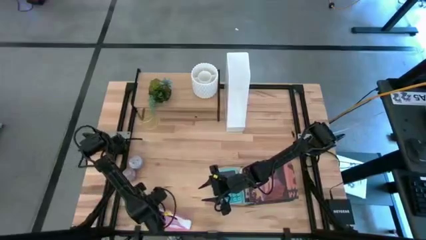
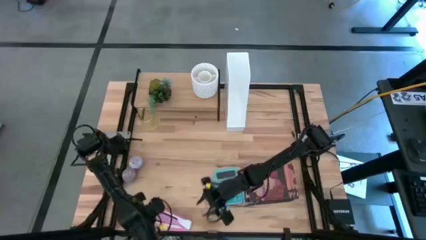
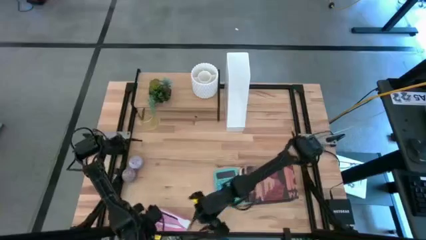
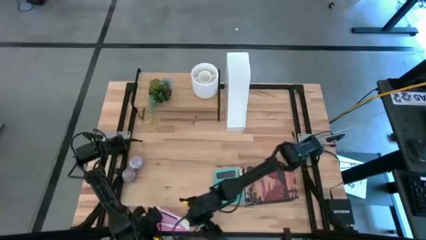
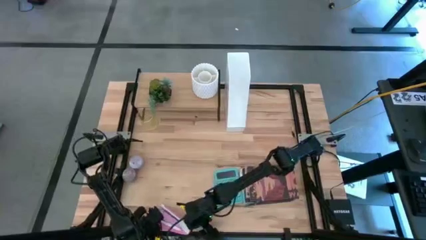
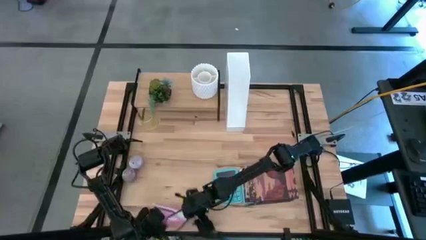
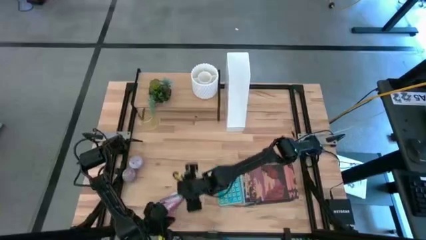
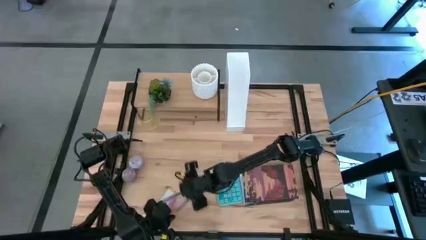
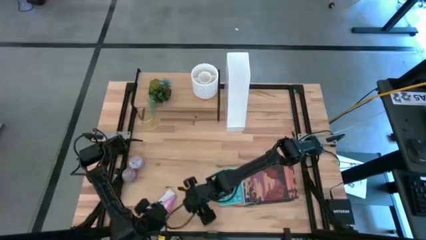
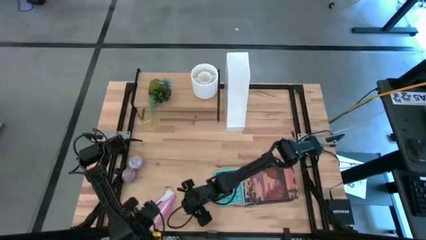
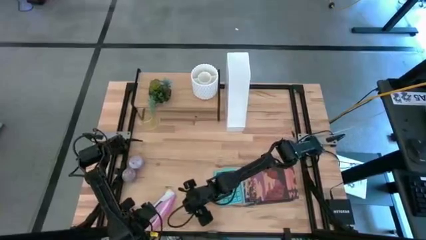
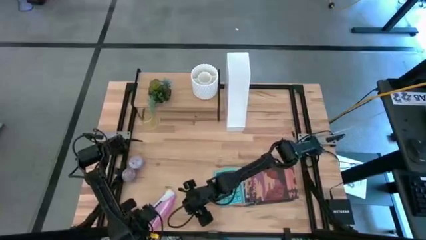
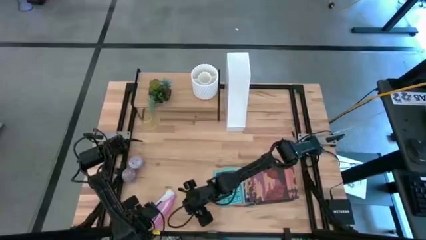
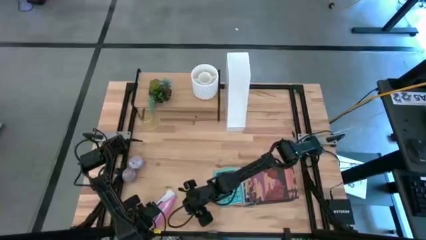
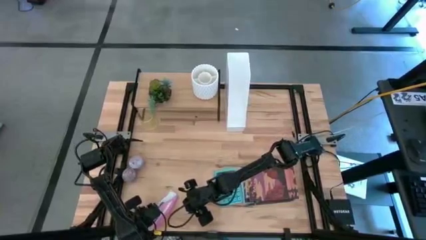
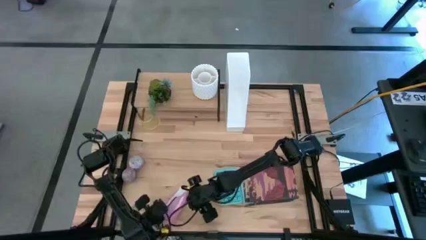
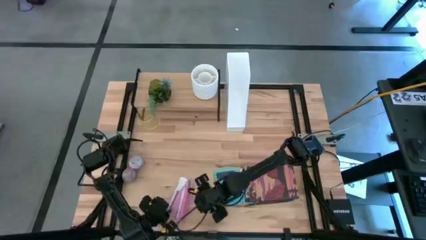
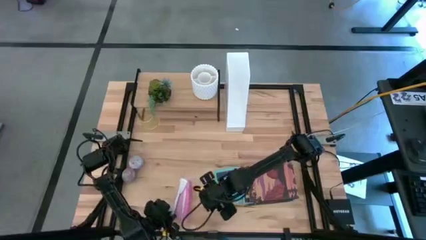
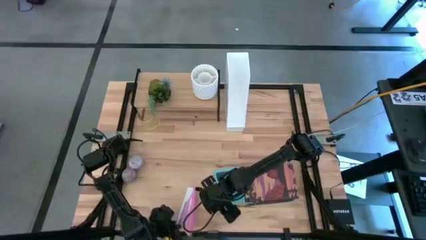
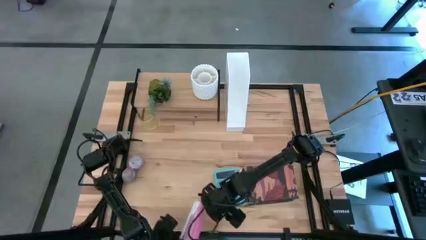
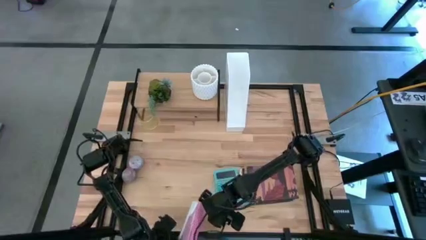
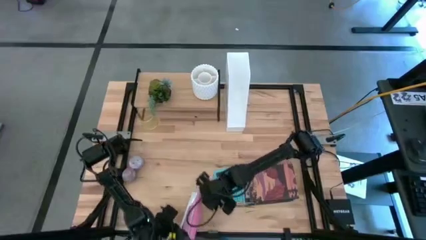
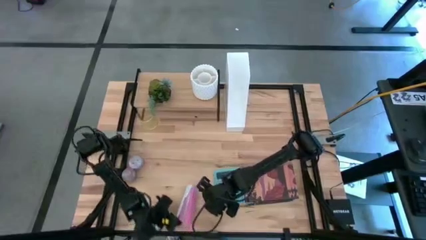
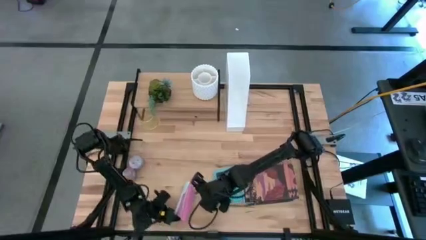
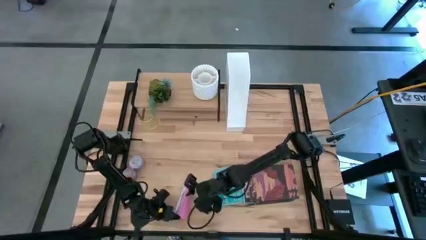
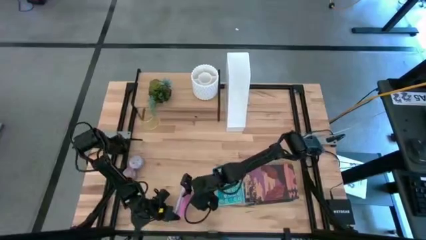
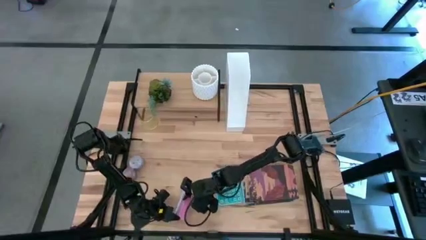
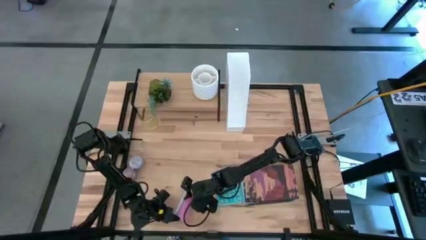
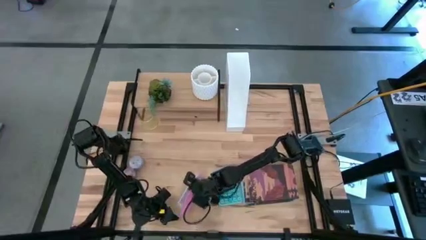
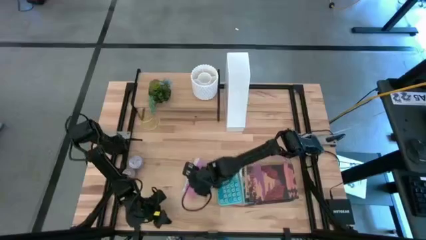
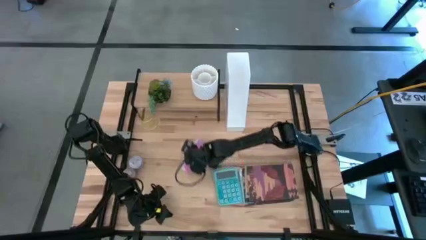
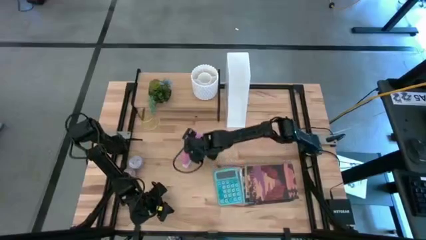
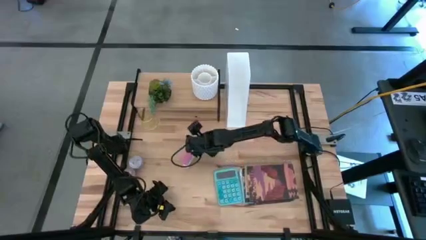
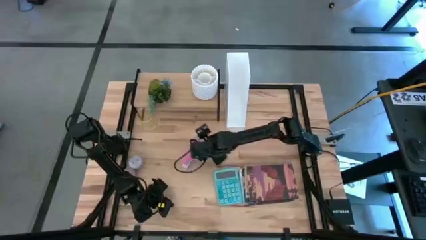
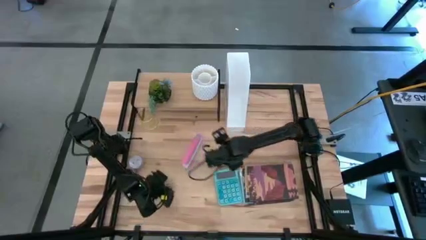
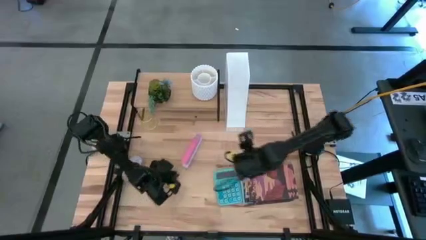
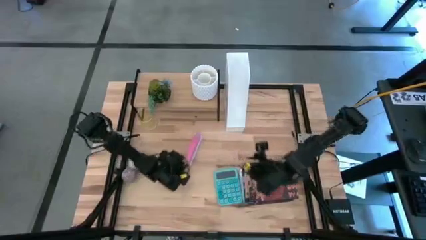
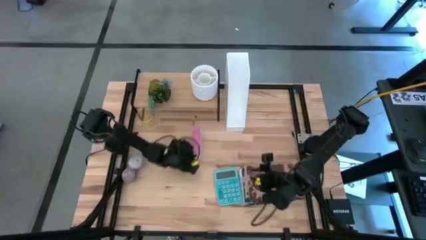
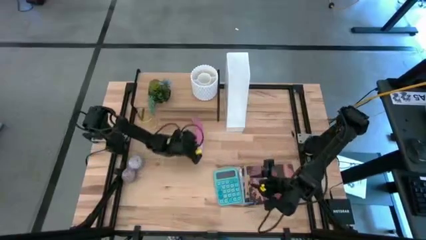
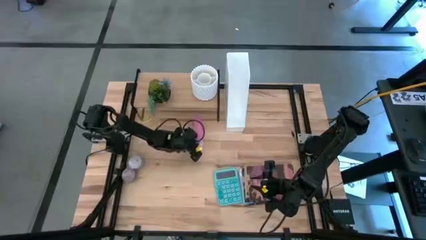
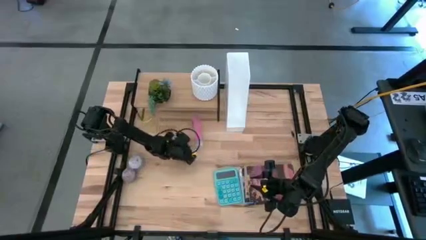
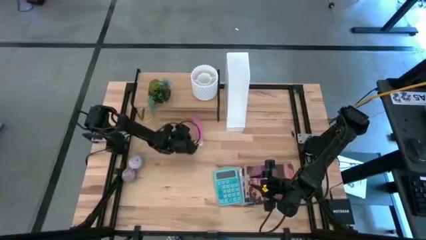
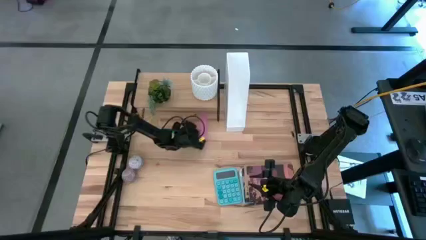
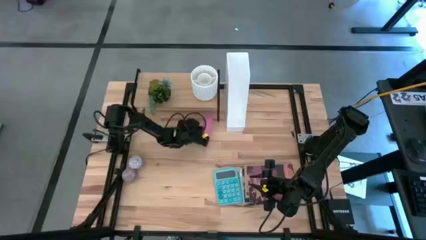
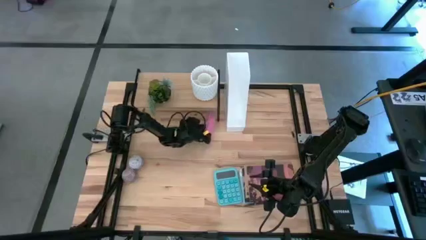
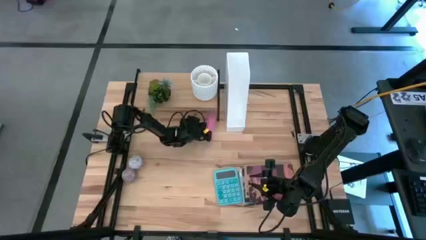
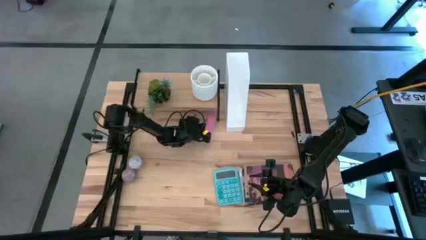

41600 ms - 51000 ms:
Task: Stock shelves
Put the pink stapler under the shelf

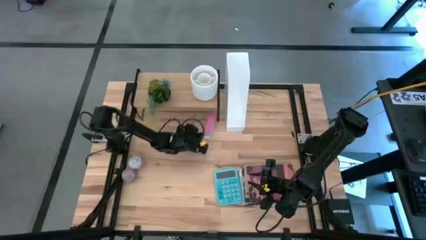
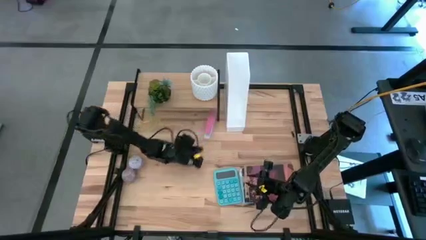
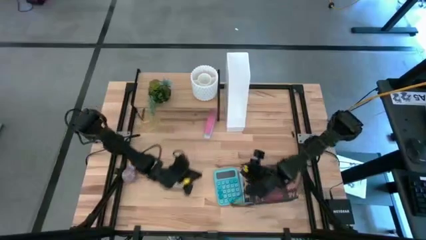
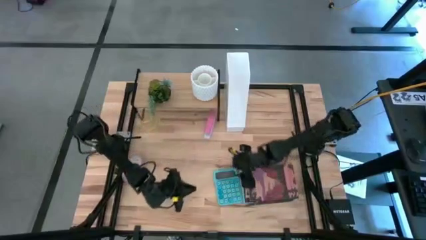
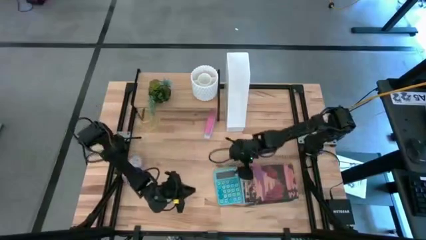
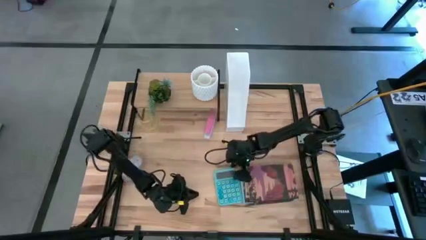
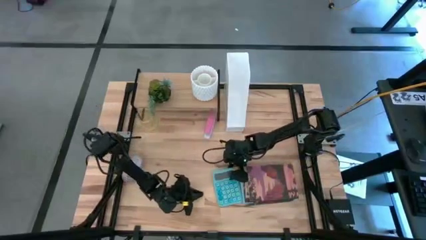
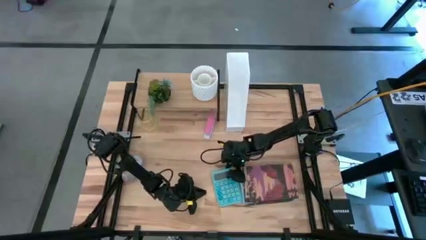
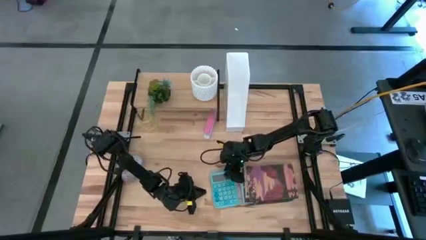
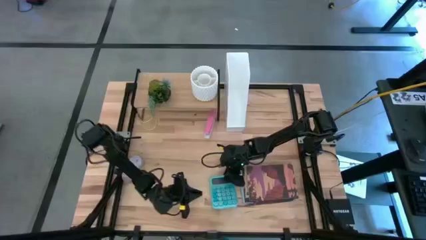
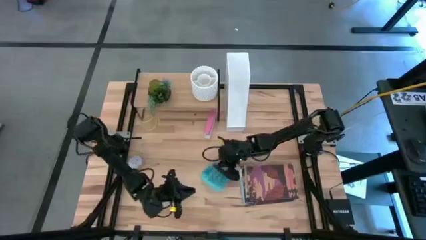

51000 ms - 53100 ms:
Put the blue calculator under the shelf

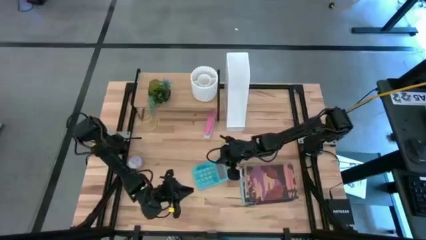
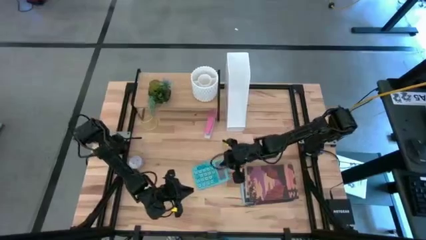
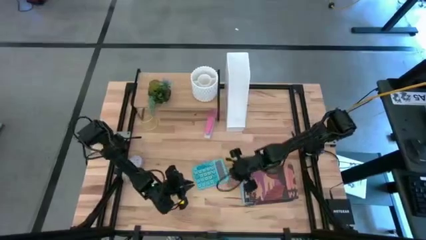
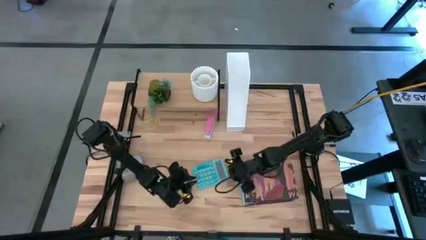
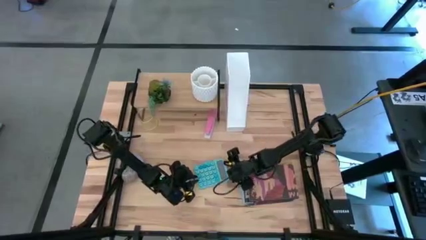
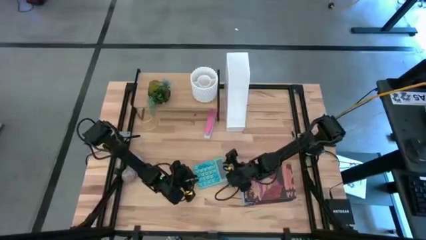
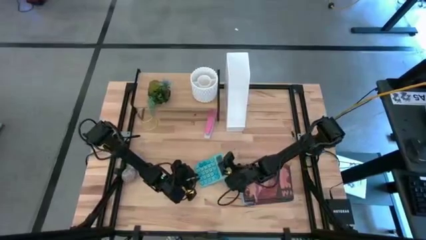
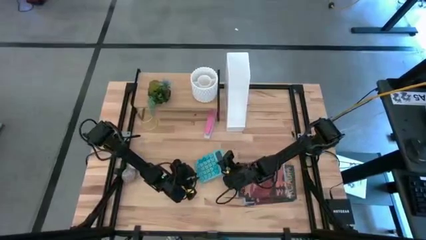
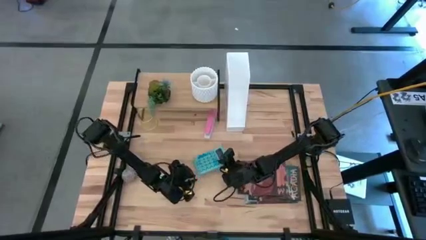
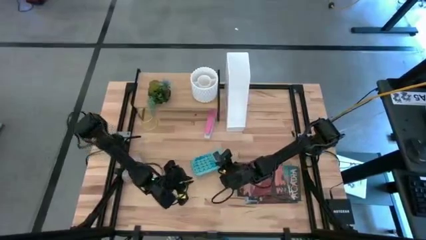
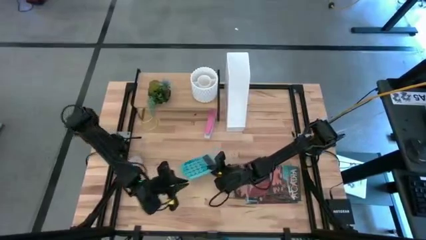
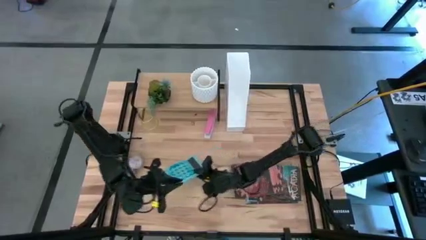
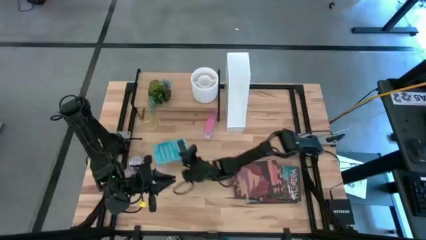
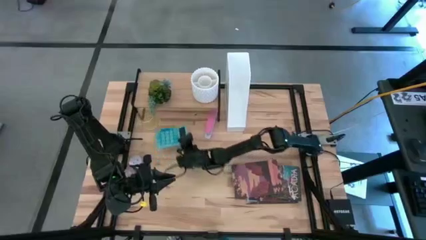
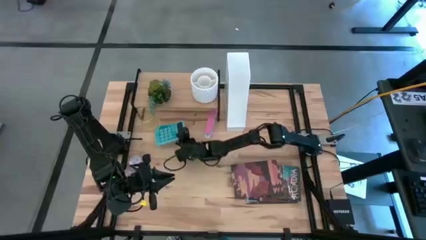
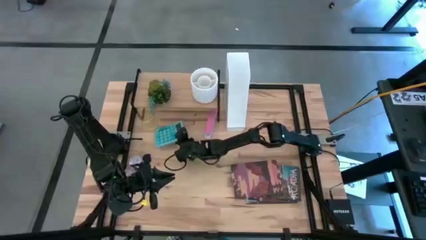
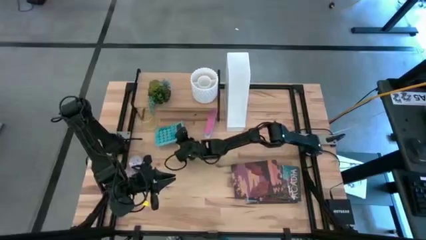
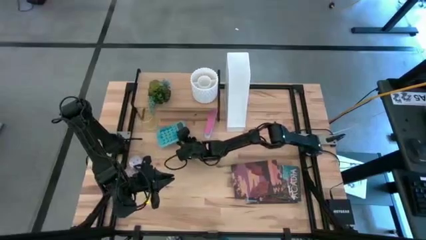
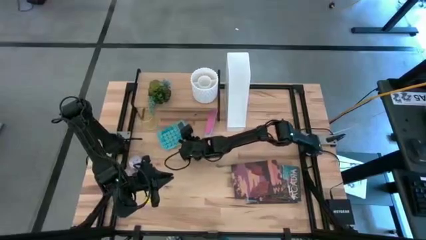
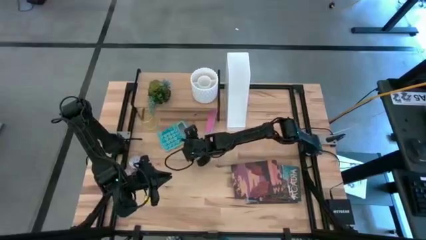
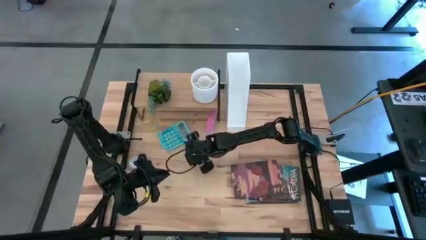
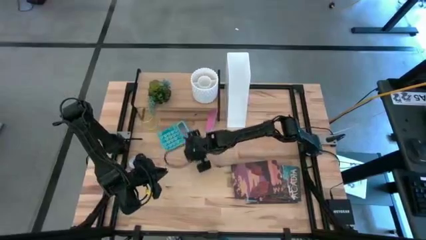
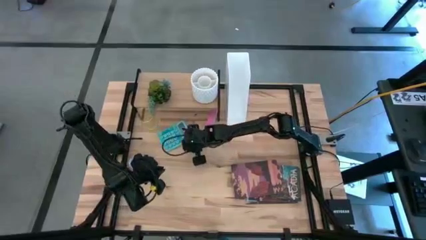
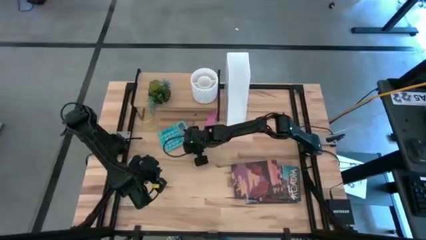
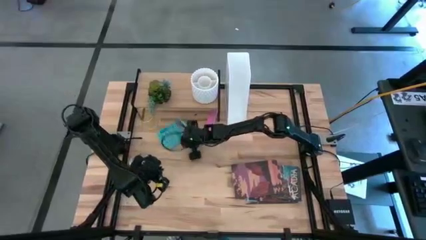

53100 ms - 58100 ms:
Put the blue calculator under the shelf
